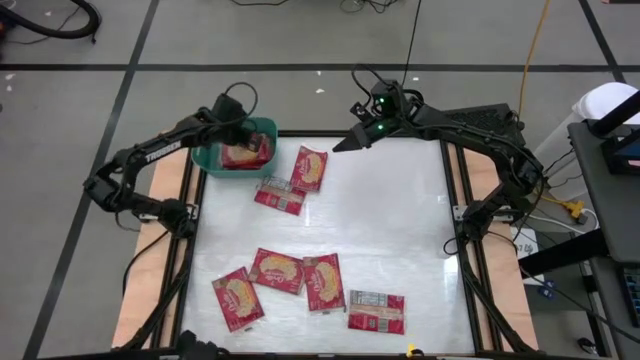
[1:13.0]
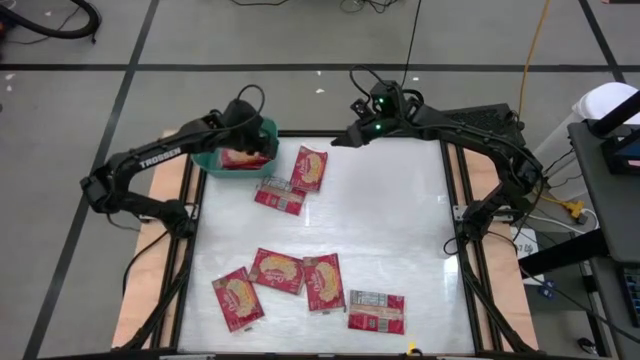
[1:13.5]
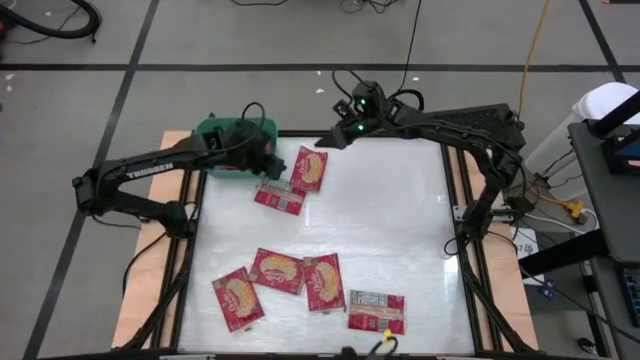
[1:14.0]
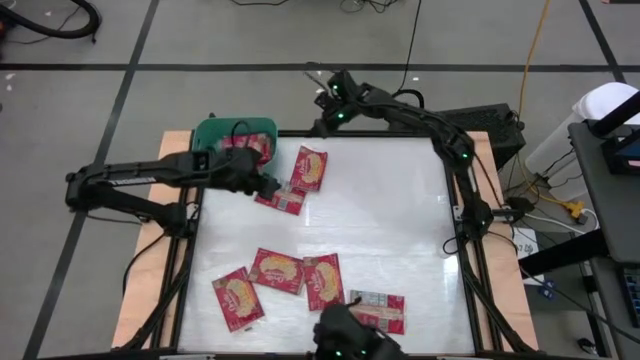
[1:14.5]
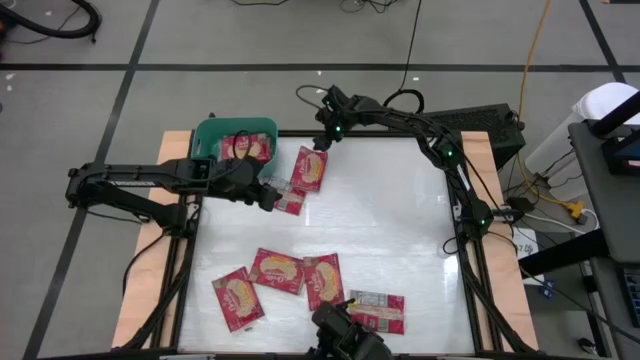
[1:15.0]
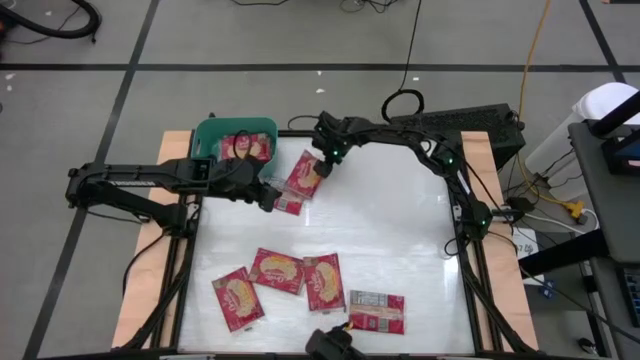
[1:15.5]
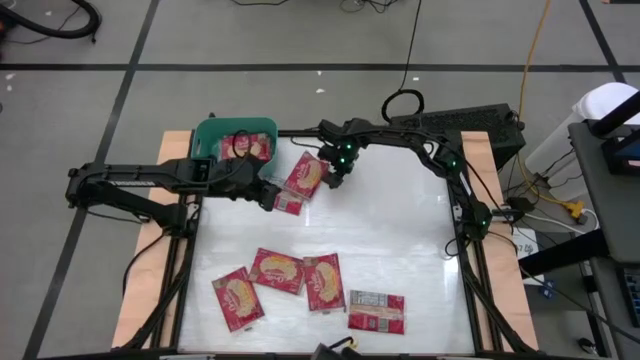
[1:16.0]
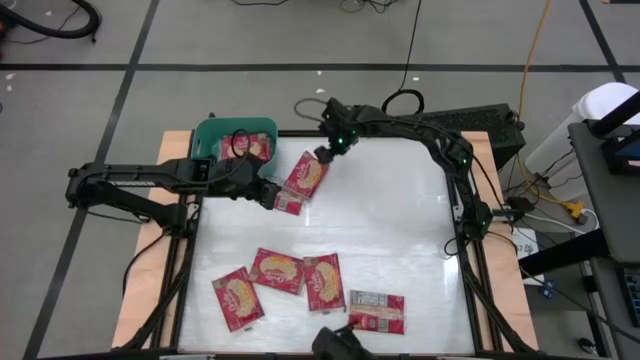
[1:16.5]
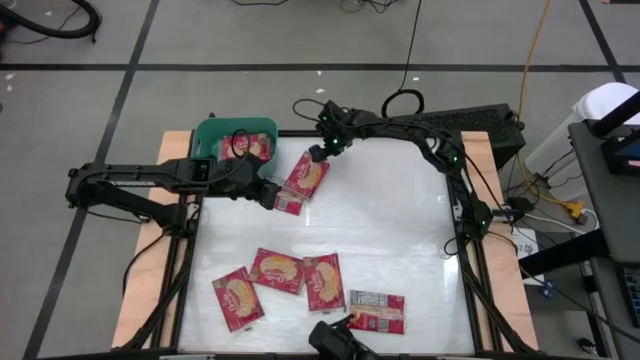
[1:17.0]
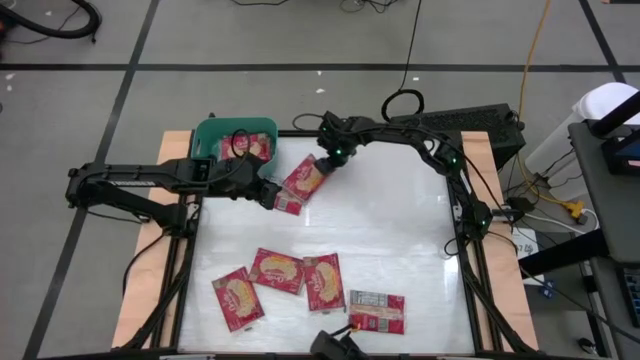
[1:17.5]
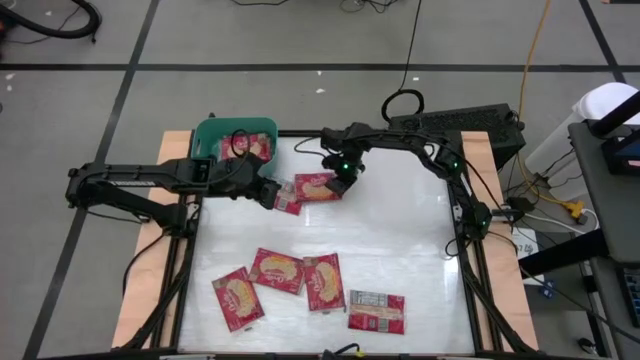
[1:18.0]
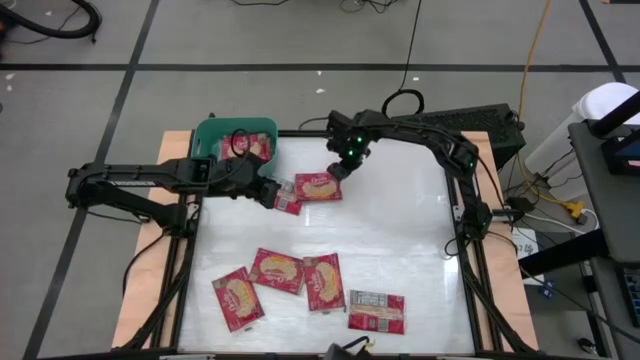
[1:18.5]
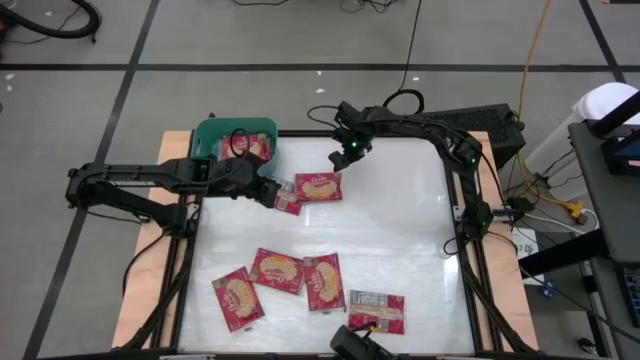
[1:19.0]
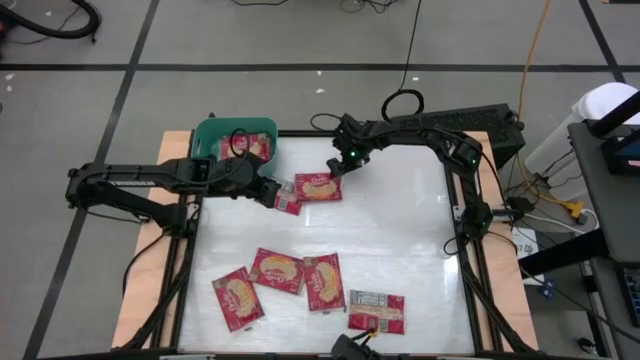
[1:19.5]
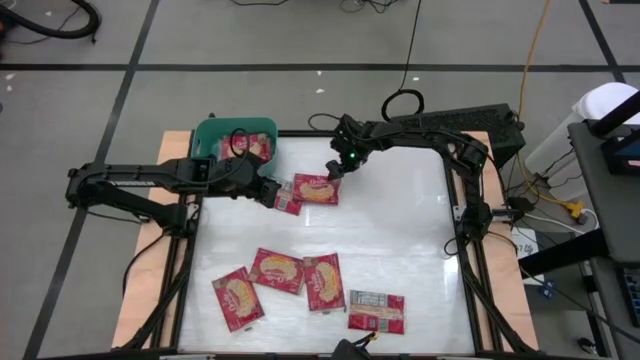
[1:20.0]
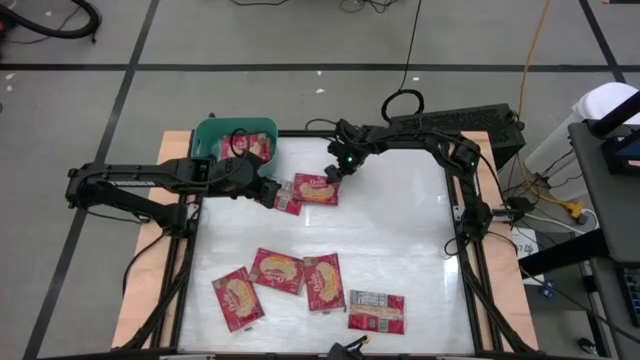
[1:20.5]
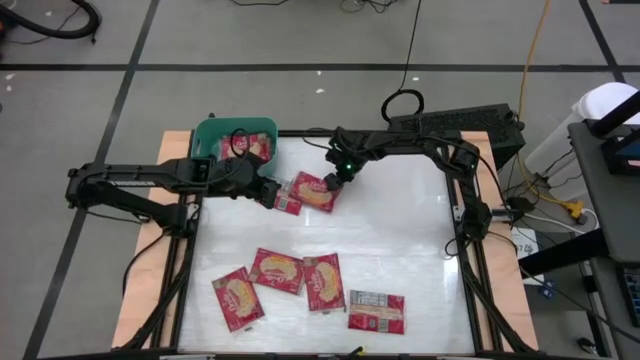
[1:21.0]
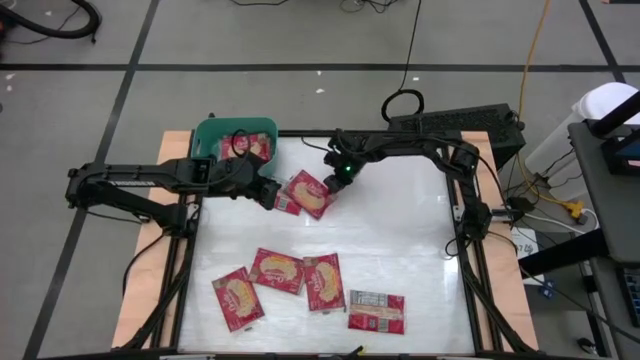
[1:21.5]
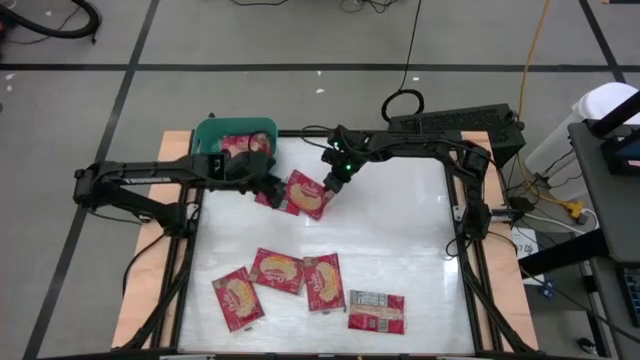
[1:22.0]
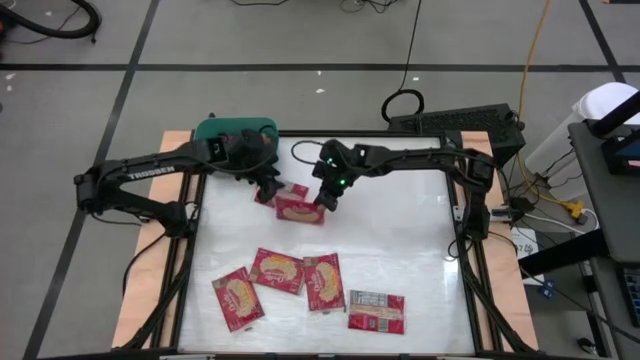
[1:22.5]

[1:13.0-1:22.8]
Task: Sort popcorn bags into baskets
Put the red popcorn bag into the green bin

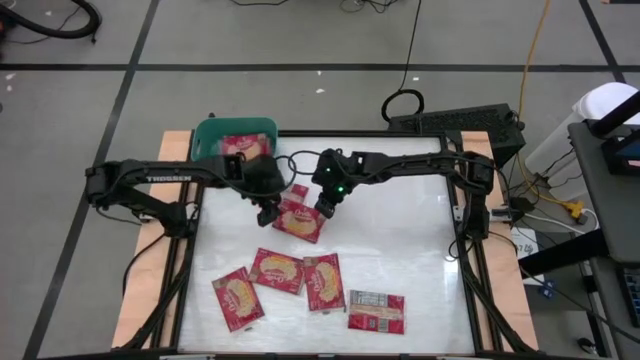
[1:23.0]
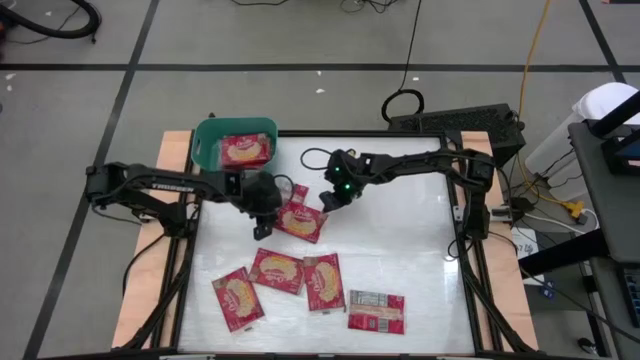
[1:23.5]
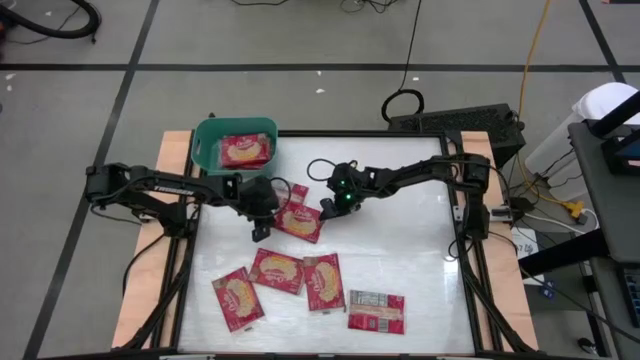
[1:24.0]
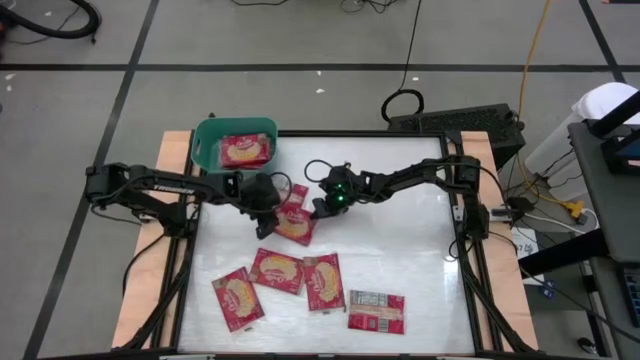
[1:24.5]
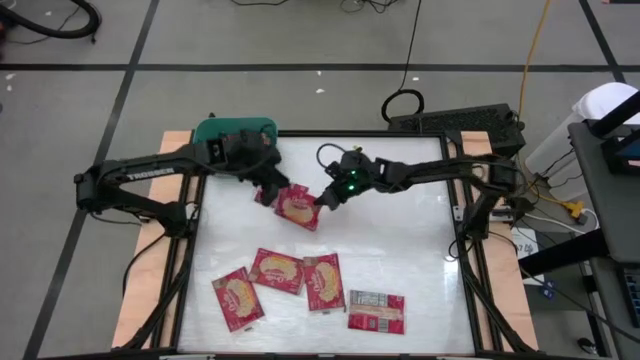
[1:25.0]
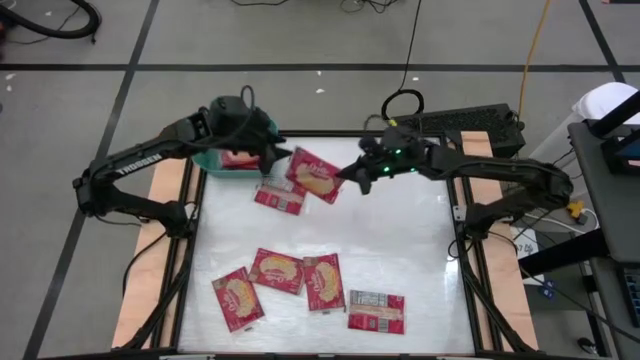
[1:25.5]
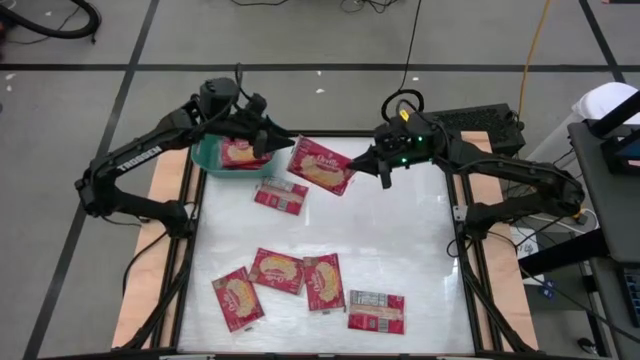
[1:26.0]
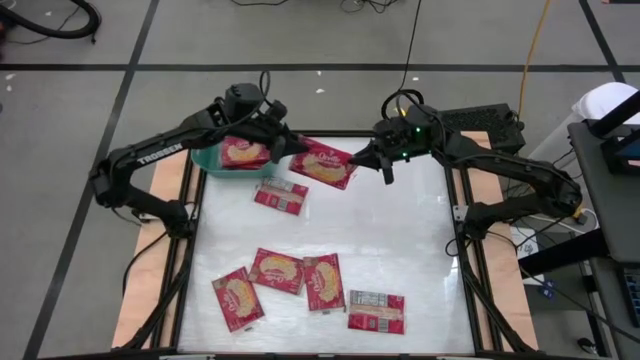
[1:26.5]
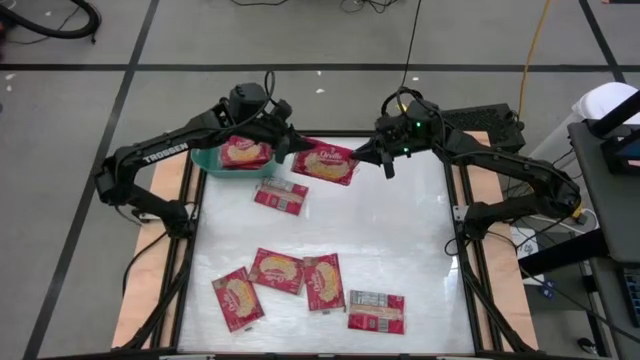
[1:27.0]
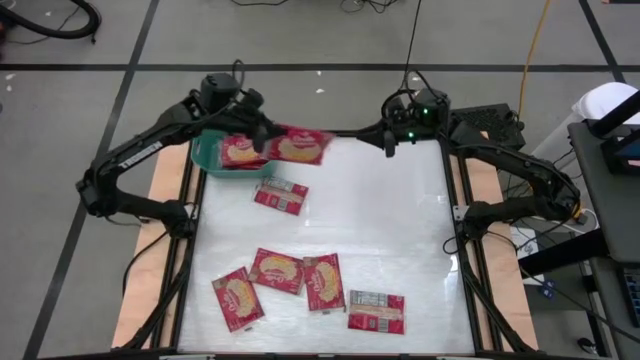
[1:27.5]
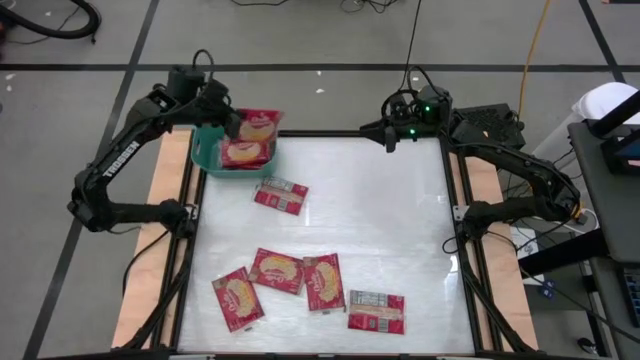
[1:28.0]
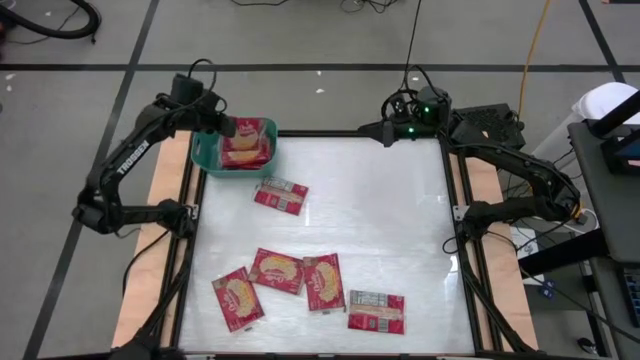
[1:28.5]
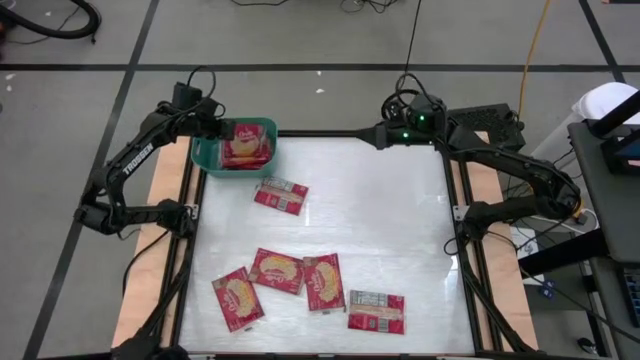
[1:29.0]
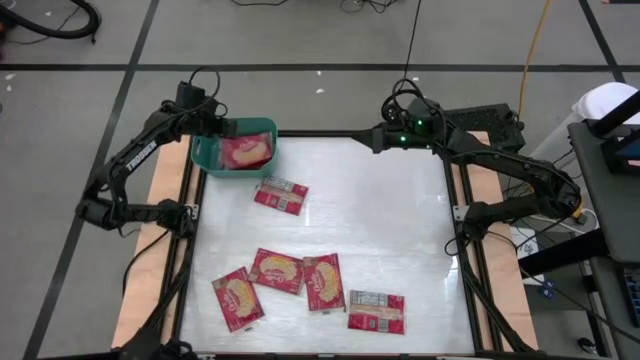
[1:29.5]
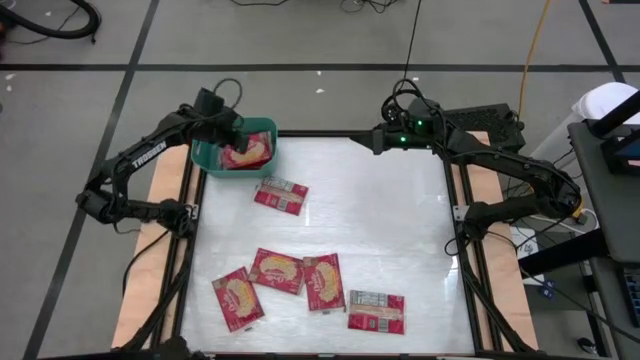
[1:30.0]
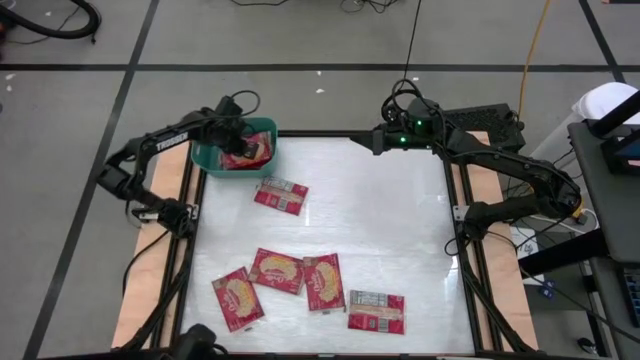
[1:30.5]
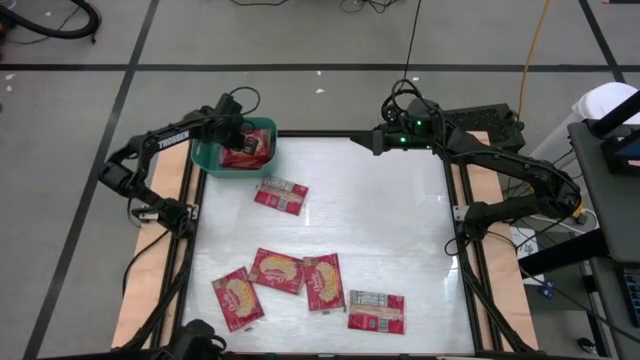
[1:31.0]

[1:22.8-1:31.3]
Put the red popcorn bag into the green bin

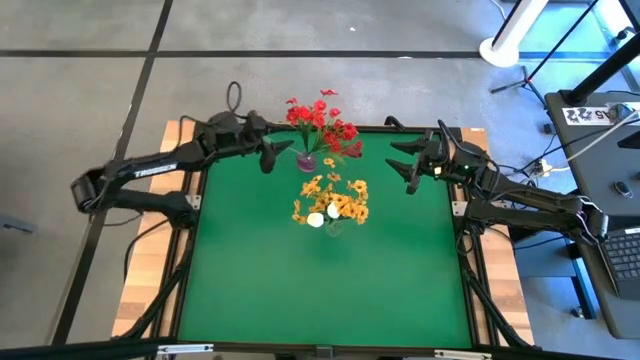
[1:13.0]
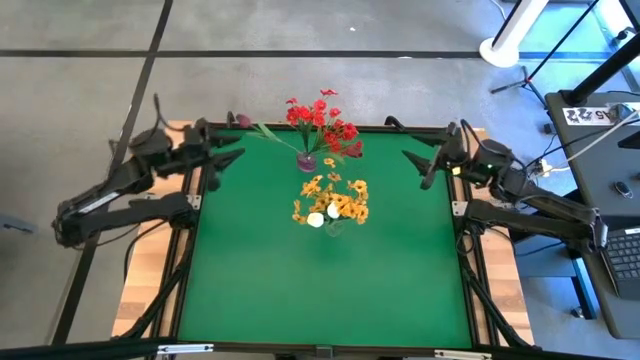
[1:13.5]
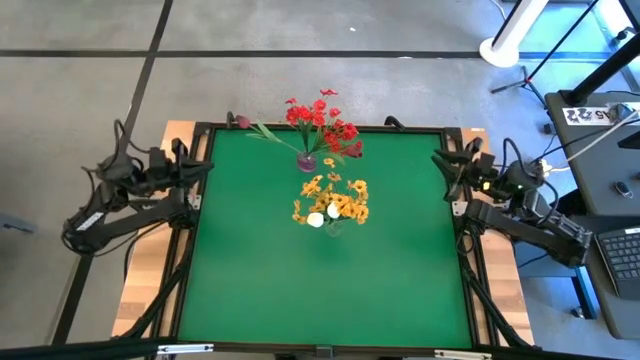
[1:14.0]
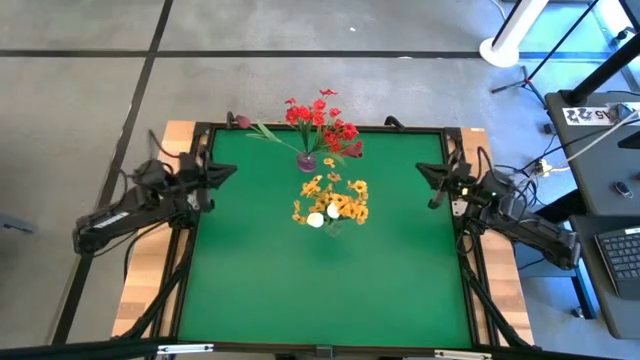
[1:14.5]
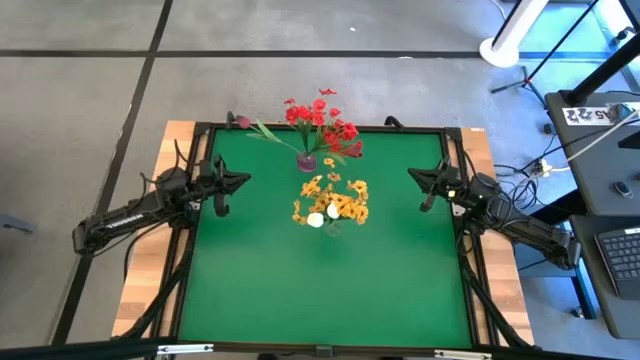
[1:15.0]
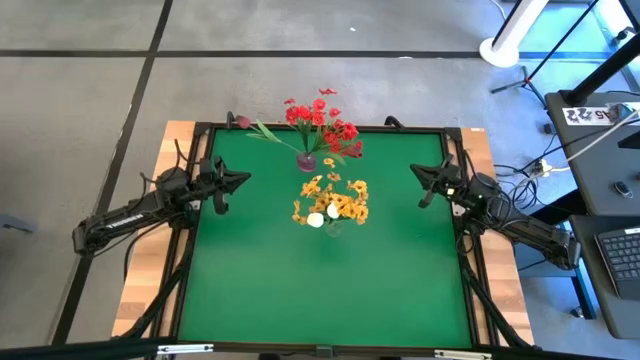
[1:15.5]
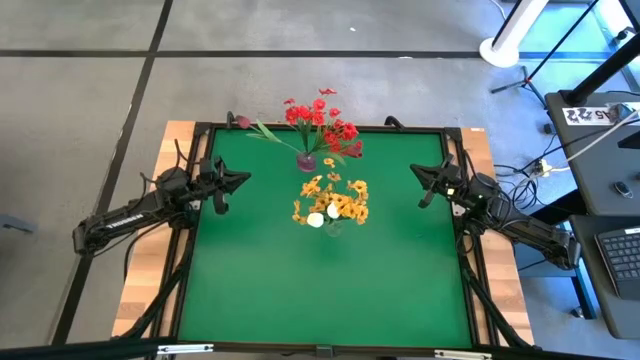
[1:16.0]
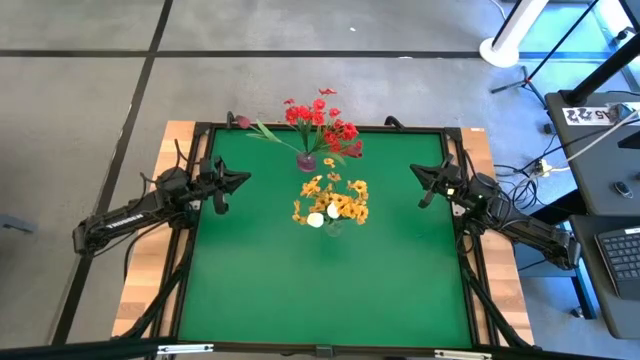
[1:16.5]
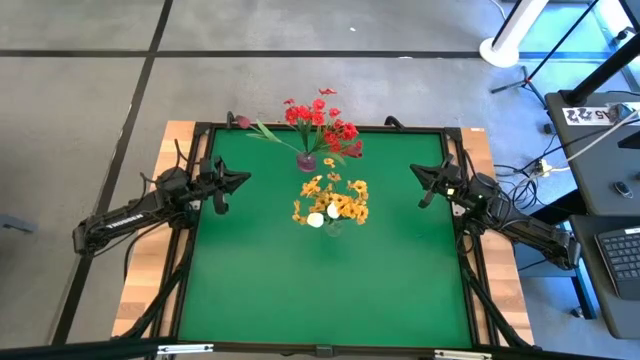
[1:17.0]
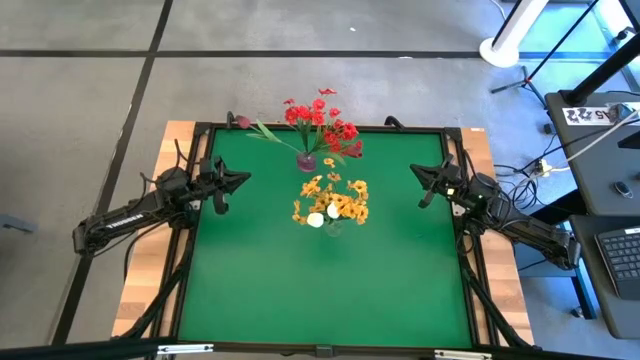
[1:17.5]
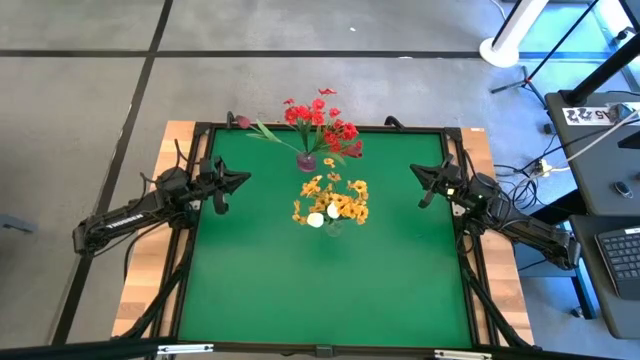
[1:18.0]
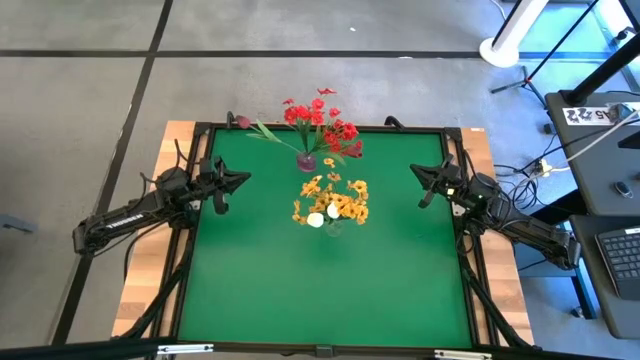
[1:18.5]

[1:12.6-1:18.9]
Task: Sort flowers into vase by color
Return to Home Position
